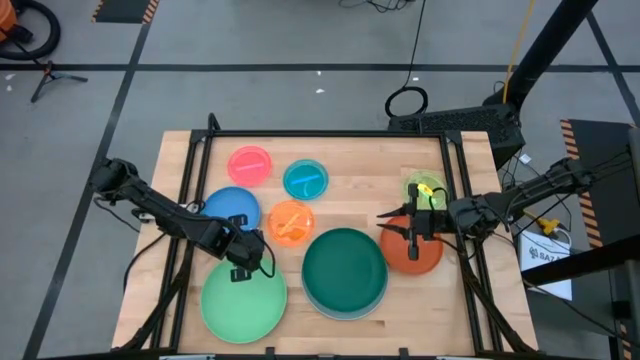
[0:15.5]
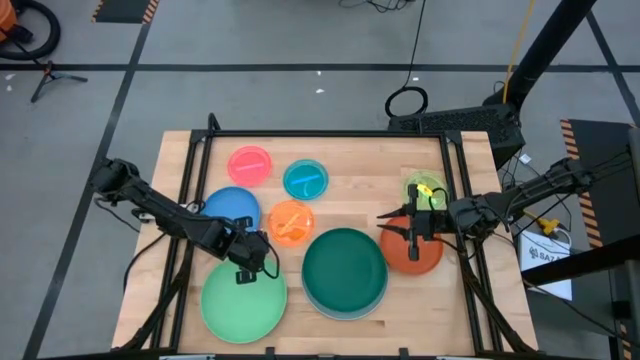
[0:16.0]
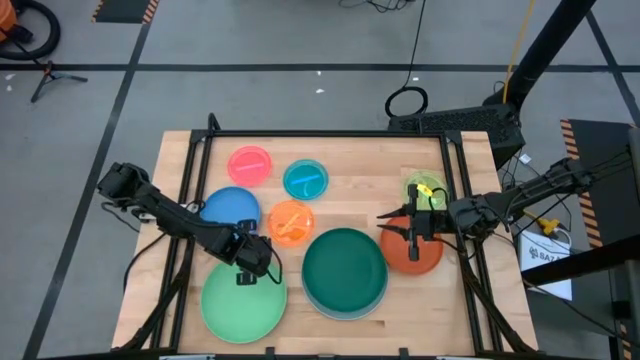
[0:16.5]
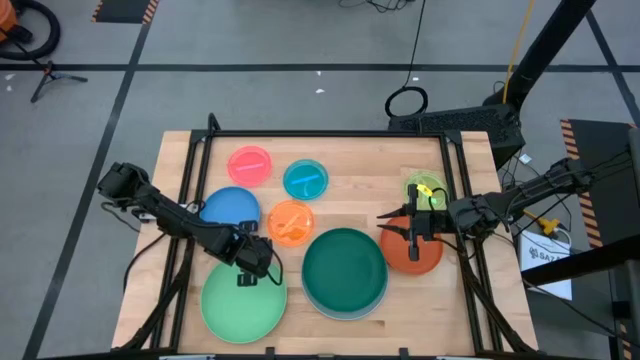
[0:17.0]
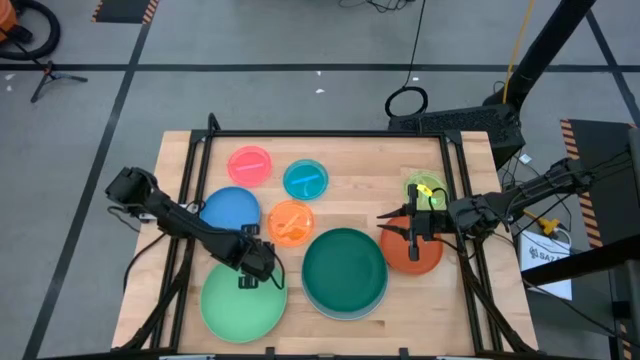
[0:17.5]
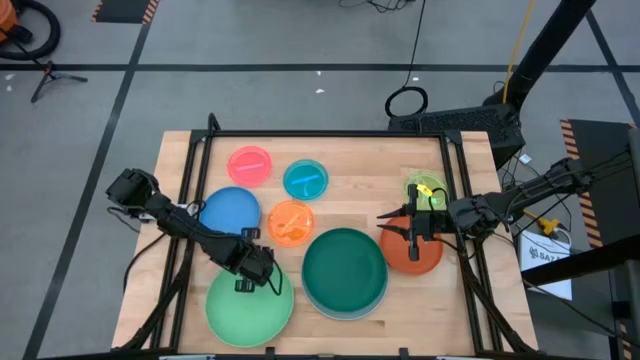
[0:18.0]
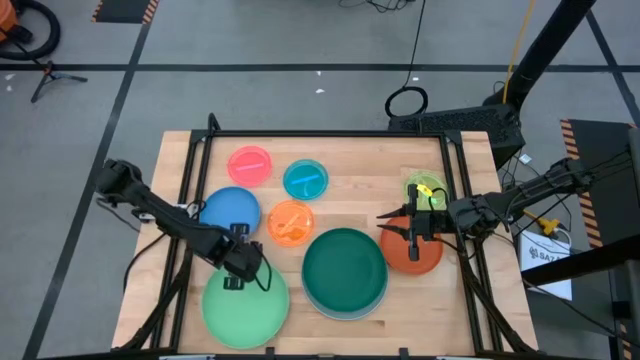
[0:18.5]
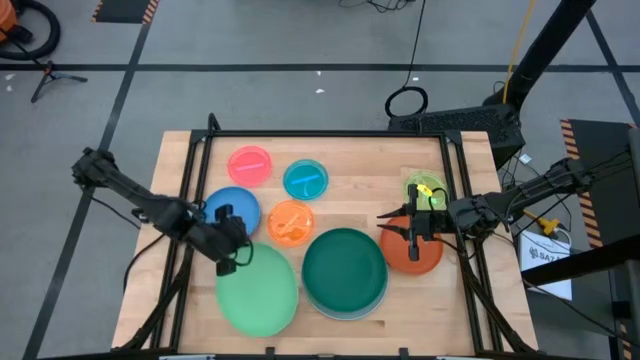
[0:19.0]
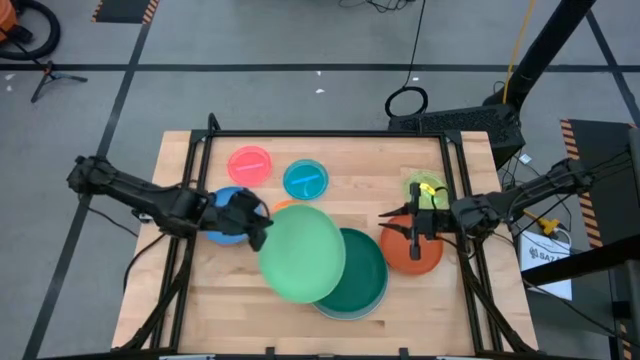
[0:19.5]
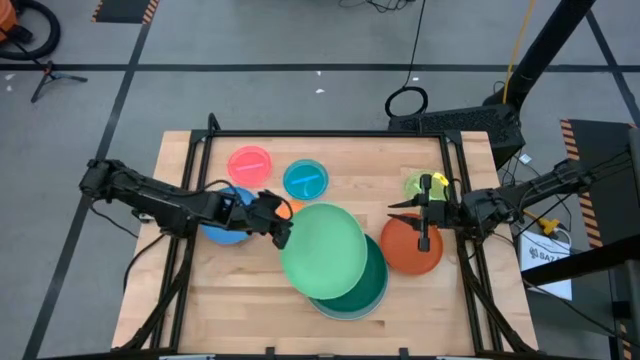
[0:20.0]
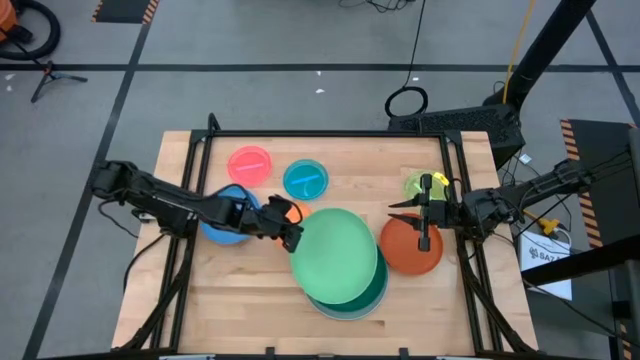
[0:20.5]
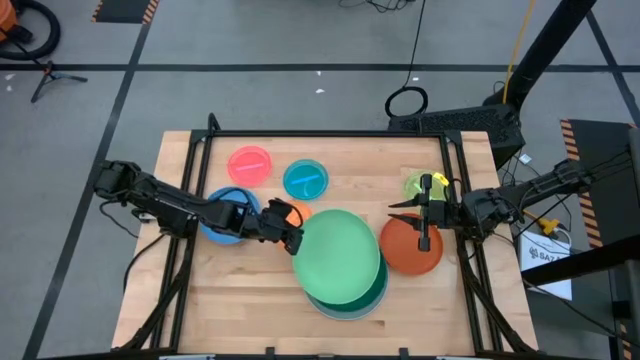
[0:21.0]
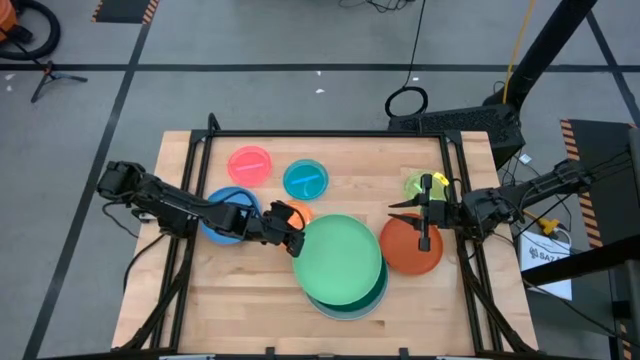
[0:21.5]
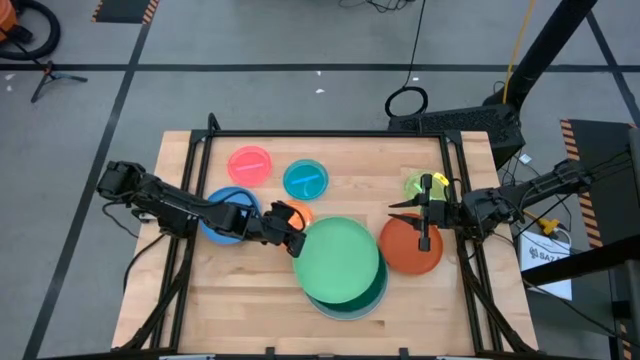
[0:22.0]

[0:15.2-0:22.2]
Task: Stack plastic plates
Stack the light green plate on top of the dark green plate

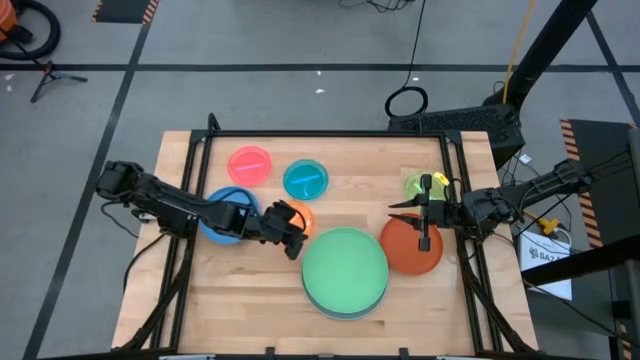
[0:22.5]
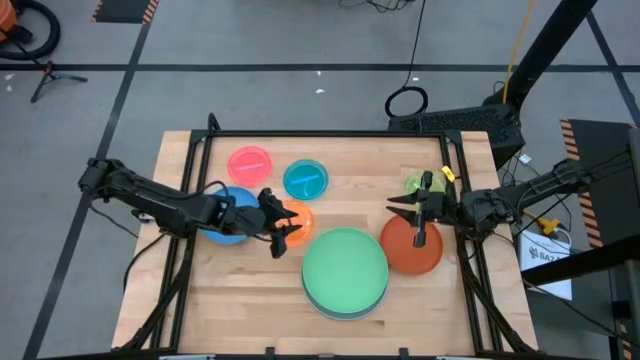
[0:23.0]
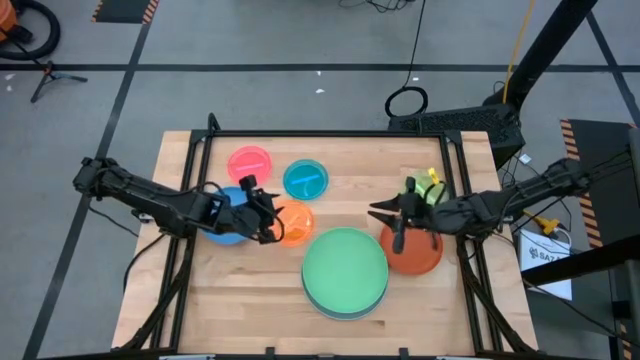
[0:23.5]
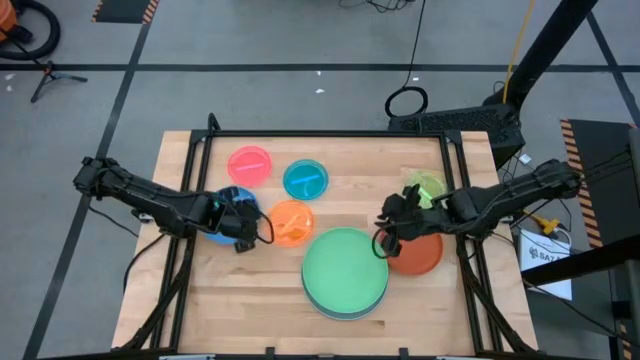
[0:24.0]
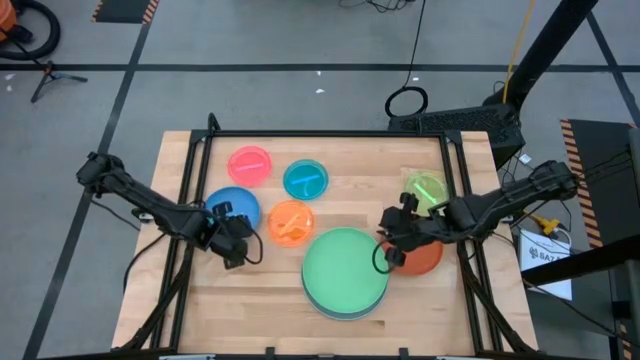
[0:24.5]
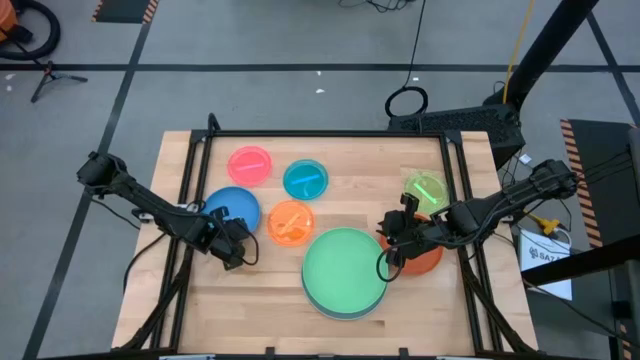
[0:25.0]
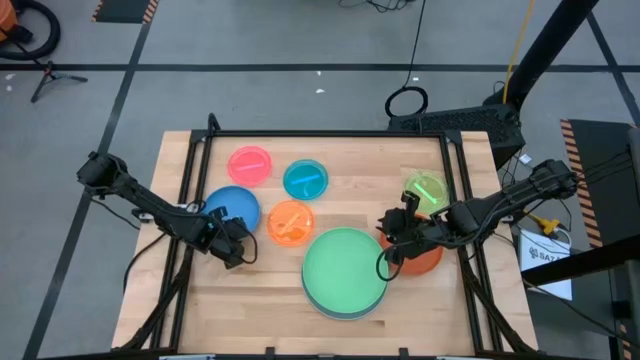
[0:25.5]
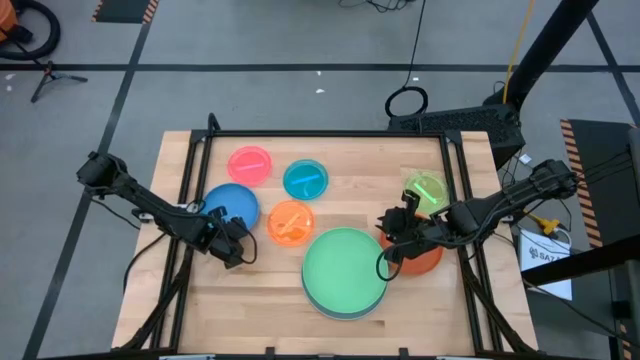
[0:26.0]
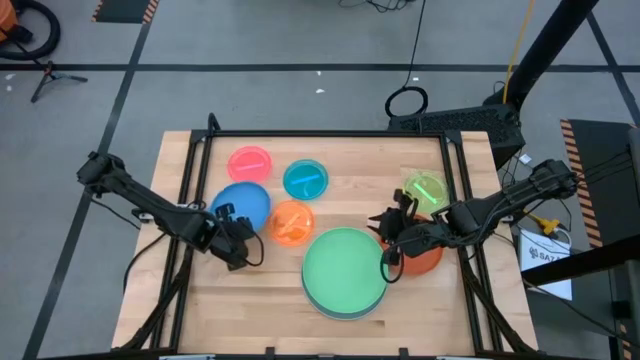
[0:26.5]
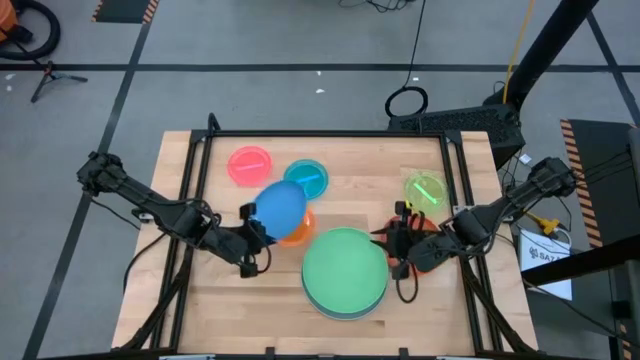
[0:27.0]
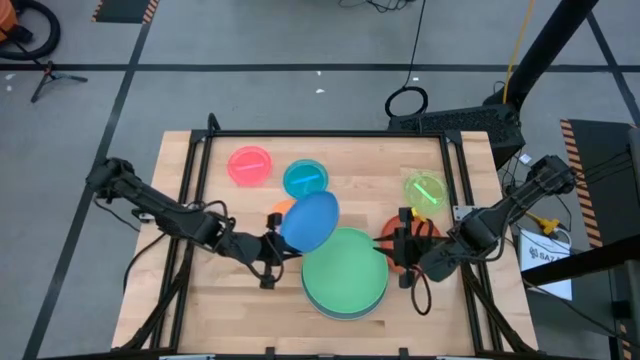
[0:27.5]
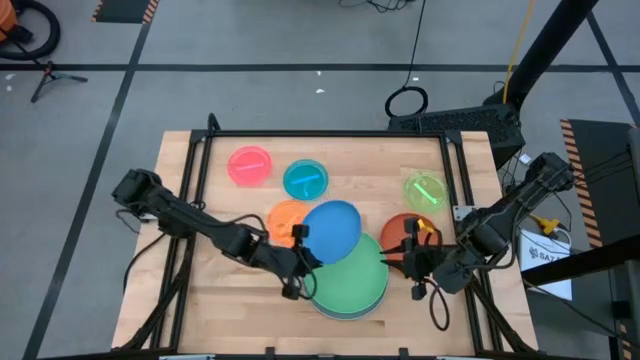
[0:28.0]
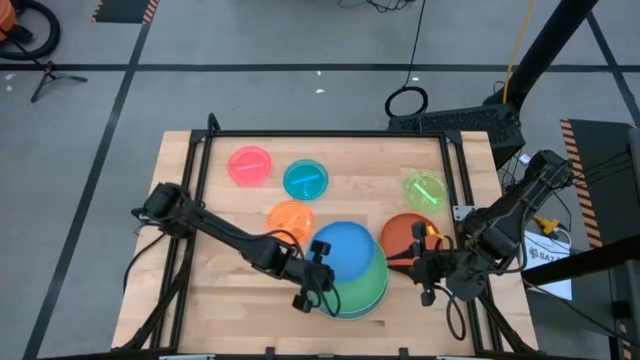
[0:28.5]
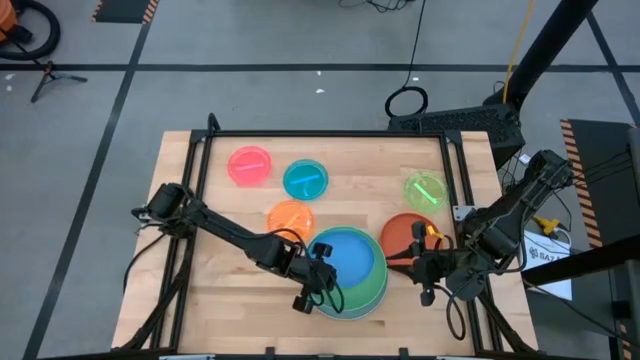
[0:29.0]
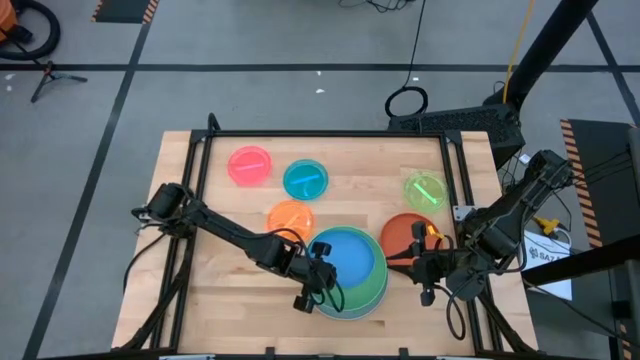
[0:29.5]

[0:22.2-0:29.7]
Stack the dark blue plate on top of the light green plate

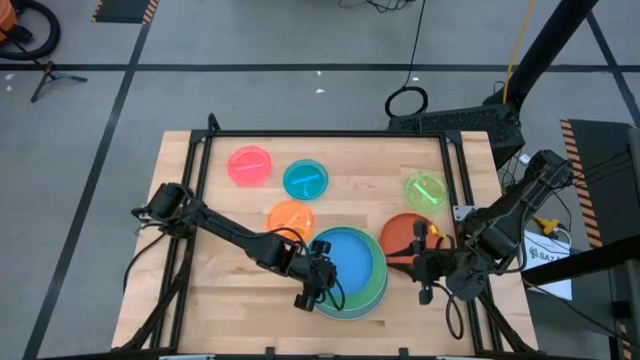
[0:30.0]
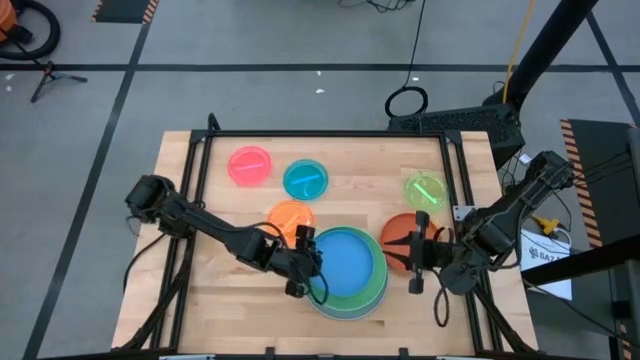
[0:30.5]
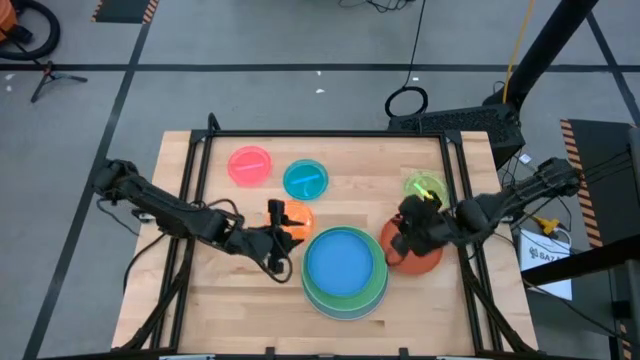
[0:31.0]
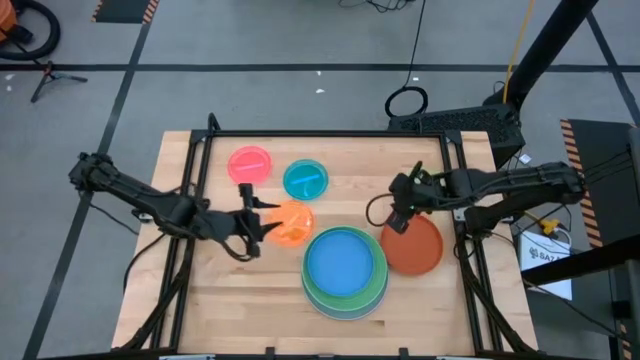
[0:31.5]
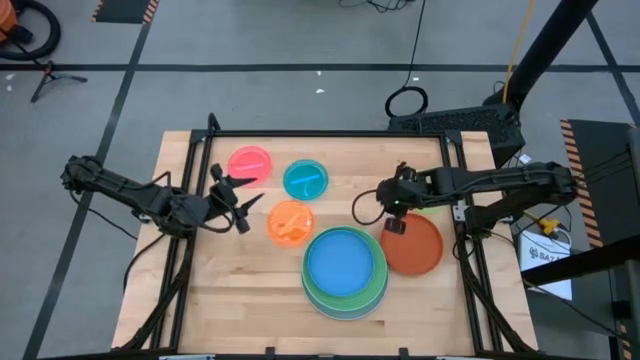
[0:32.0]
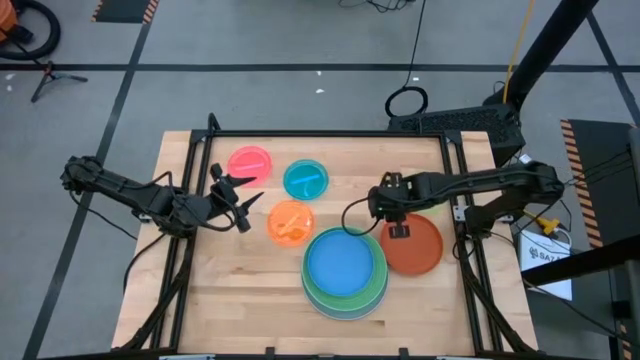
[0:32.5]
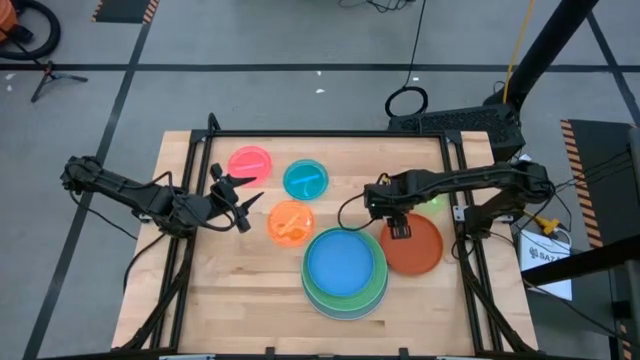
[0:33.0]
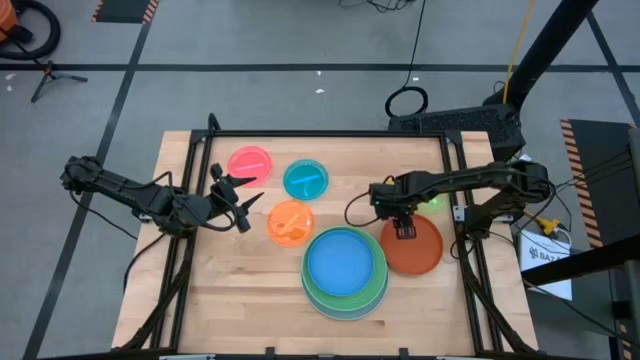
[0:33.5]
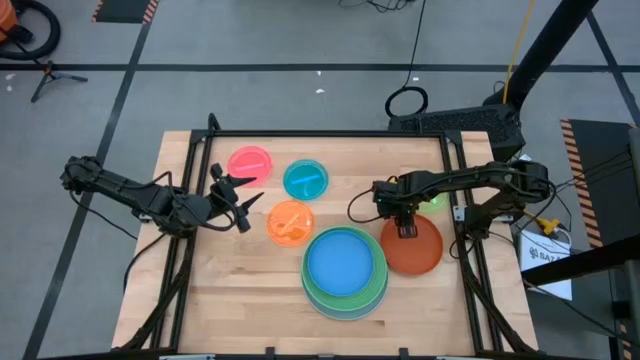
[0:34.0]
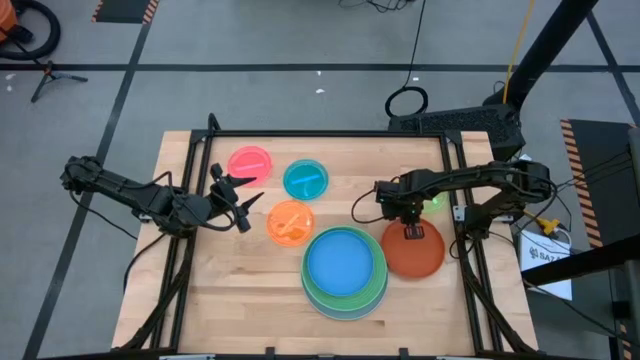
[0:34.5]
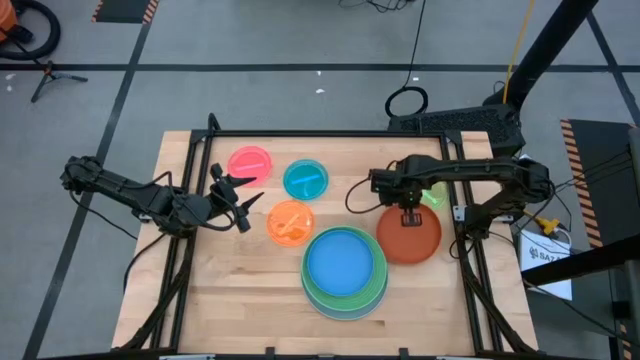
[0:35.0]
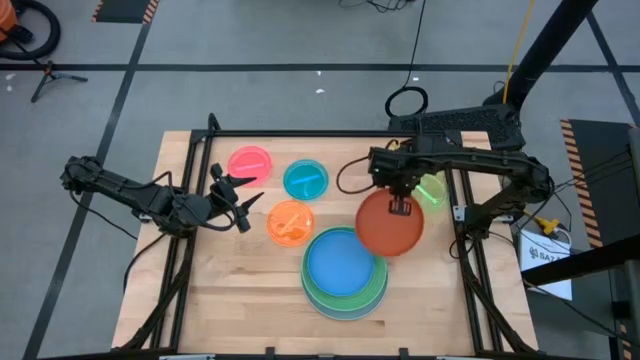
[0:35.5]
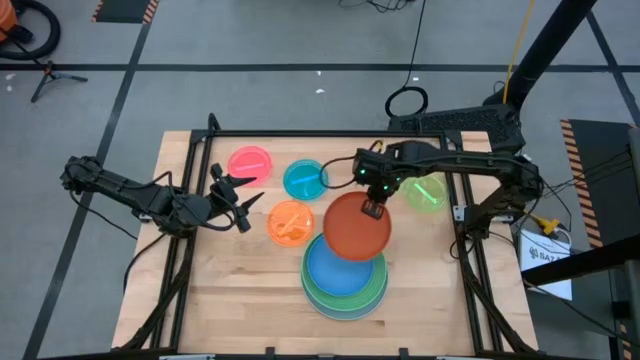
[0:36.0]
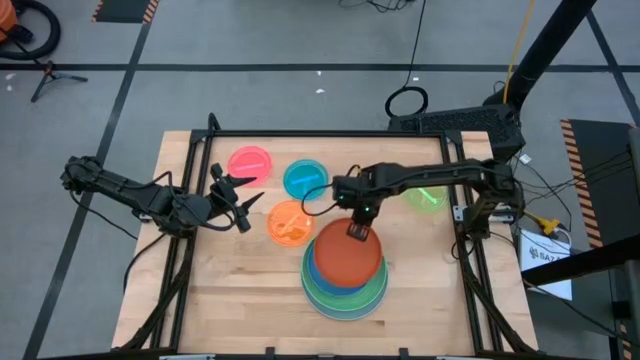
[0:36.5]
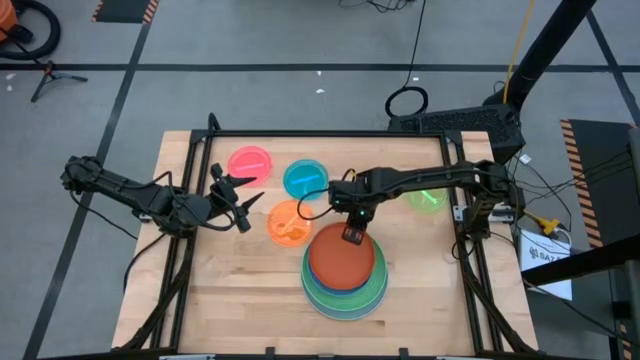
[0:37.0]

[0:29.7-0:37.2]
Stack the dark orange plate on top of the dark blue plate
